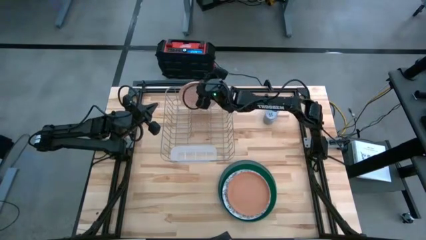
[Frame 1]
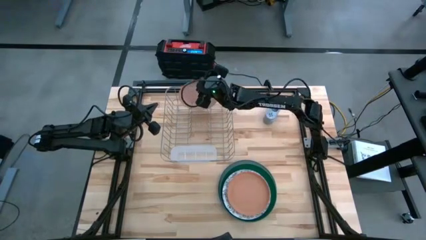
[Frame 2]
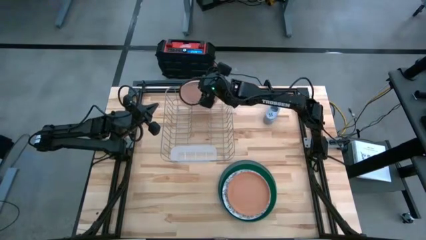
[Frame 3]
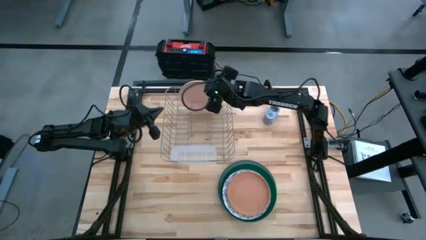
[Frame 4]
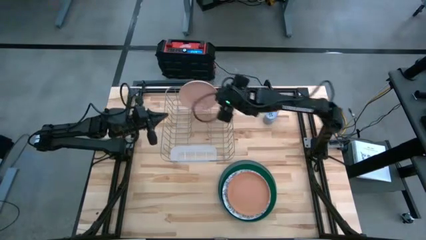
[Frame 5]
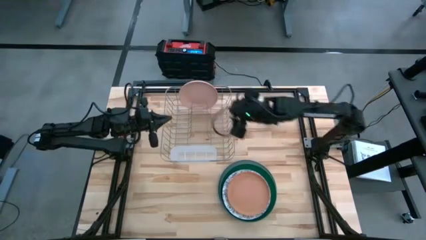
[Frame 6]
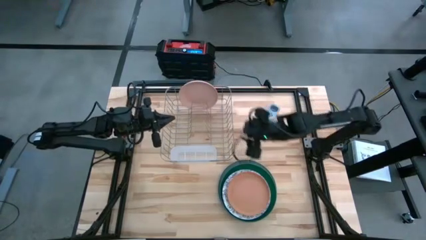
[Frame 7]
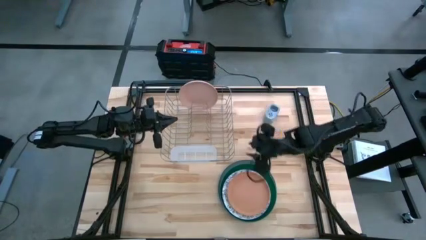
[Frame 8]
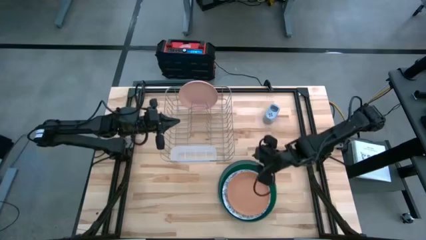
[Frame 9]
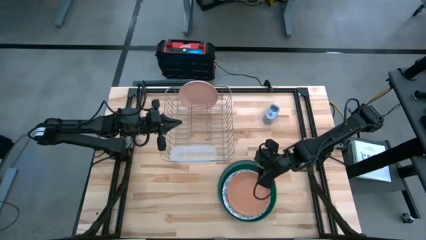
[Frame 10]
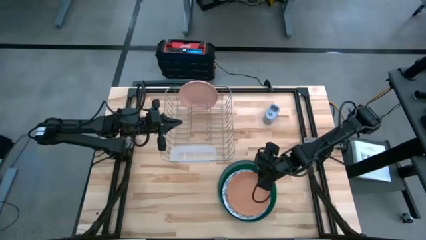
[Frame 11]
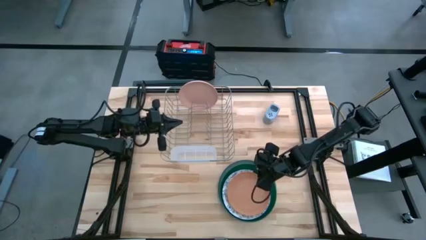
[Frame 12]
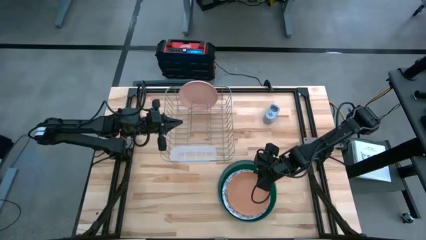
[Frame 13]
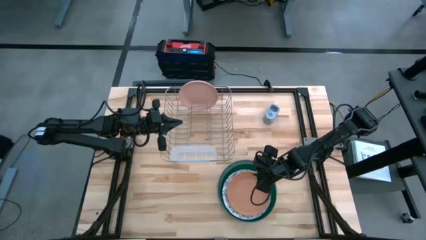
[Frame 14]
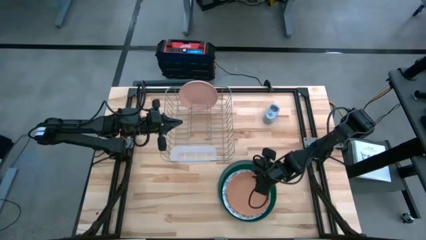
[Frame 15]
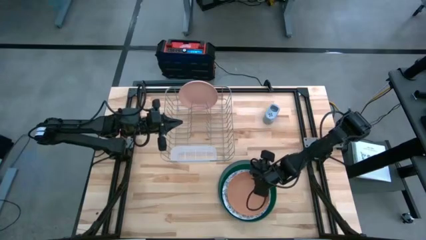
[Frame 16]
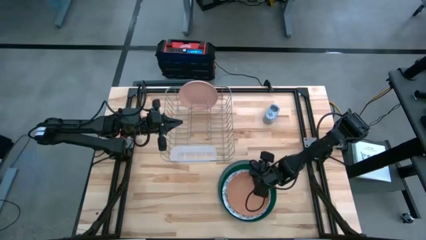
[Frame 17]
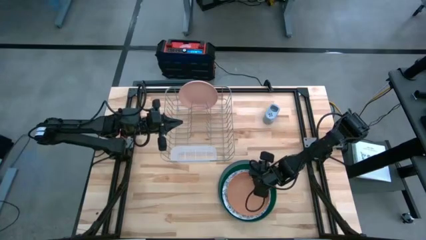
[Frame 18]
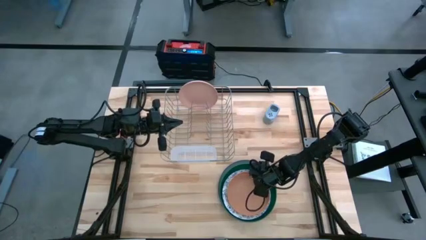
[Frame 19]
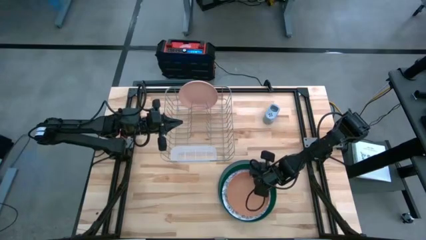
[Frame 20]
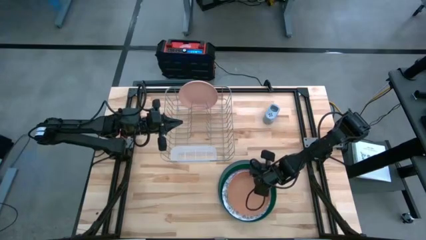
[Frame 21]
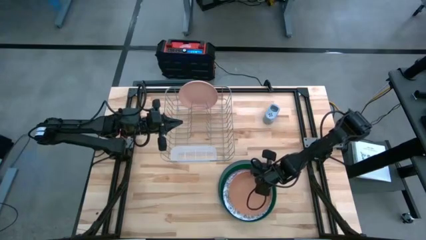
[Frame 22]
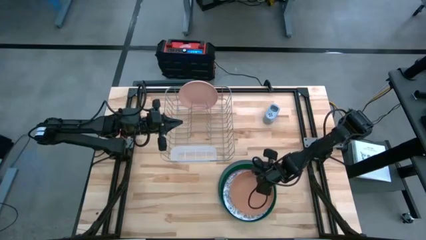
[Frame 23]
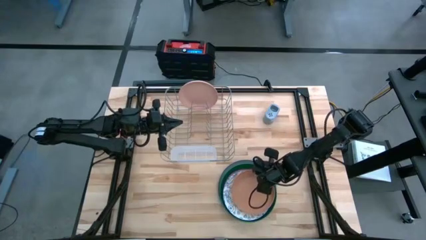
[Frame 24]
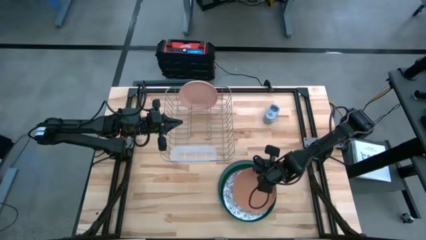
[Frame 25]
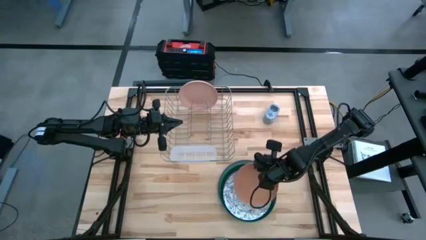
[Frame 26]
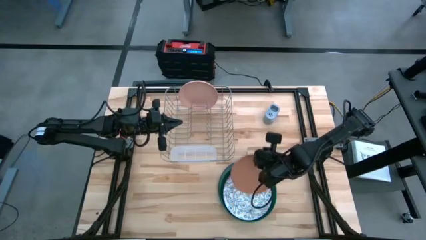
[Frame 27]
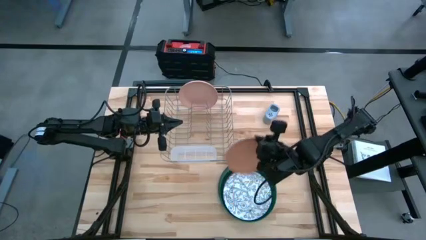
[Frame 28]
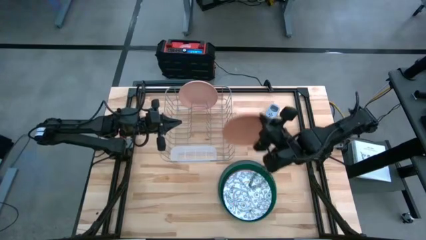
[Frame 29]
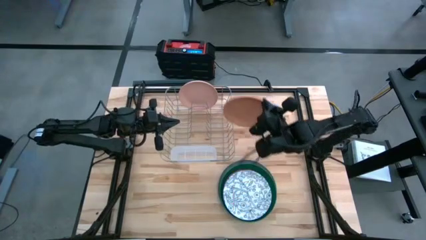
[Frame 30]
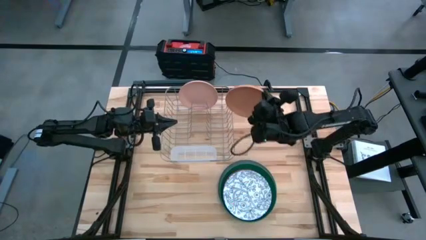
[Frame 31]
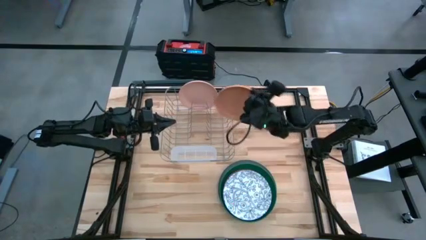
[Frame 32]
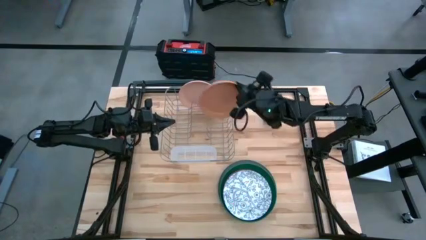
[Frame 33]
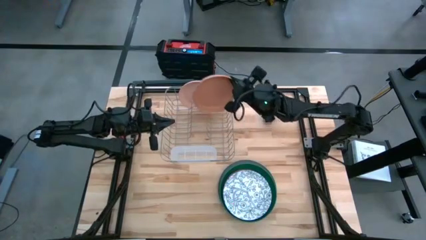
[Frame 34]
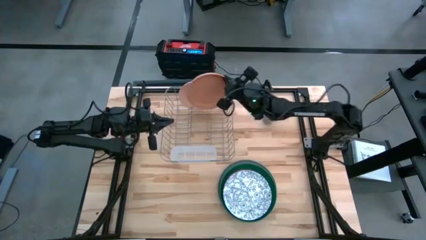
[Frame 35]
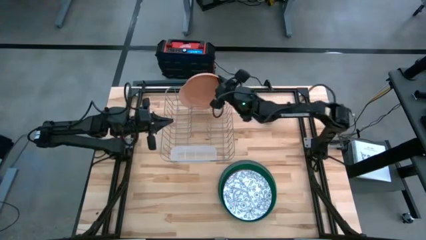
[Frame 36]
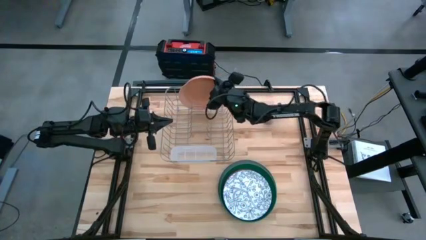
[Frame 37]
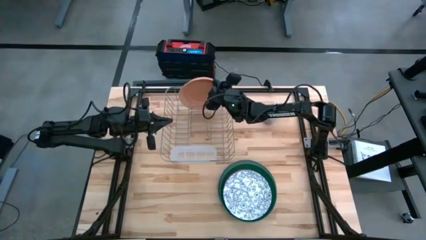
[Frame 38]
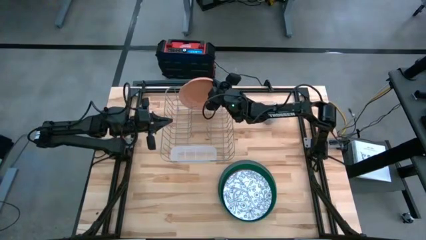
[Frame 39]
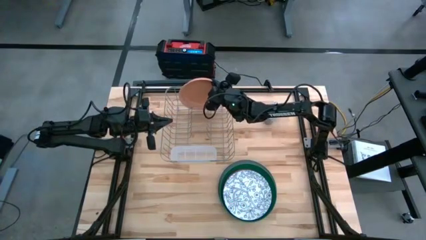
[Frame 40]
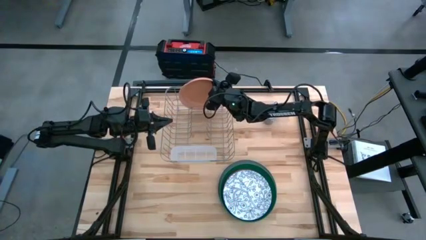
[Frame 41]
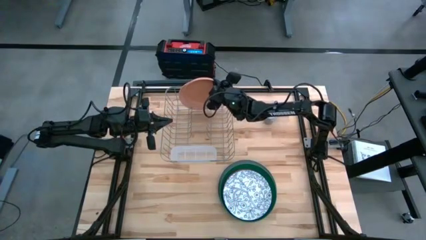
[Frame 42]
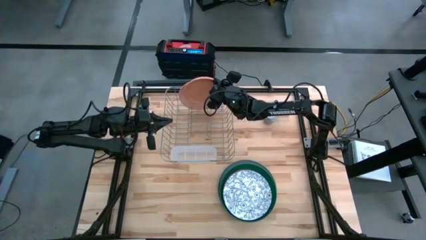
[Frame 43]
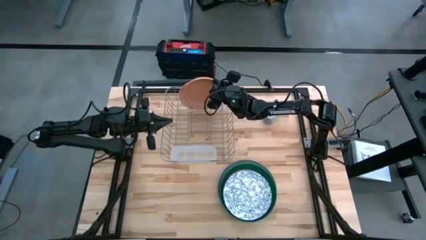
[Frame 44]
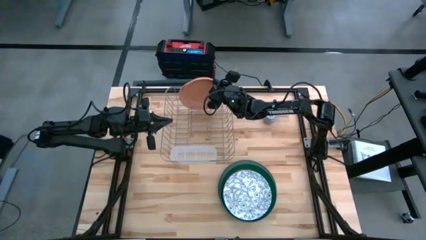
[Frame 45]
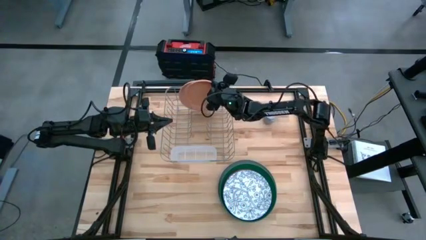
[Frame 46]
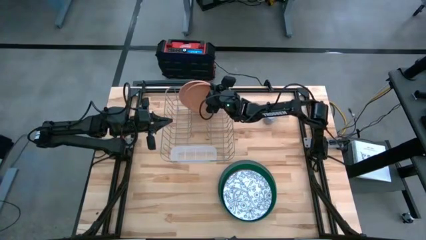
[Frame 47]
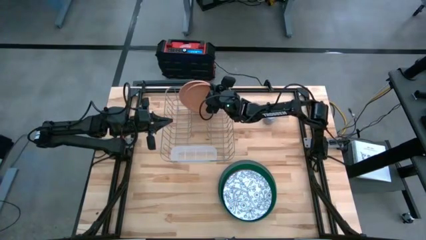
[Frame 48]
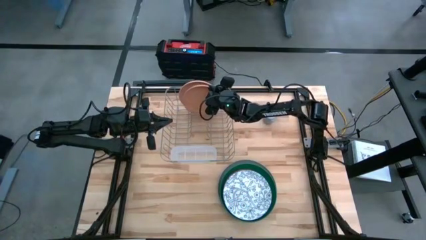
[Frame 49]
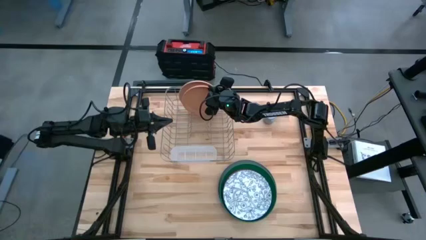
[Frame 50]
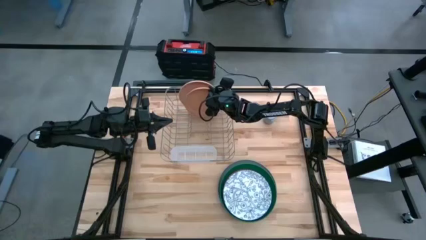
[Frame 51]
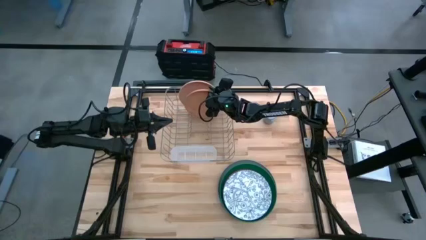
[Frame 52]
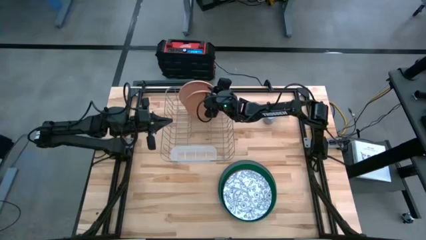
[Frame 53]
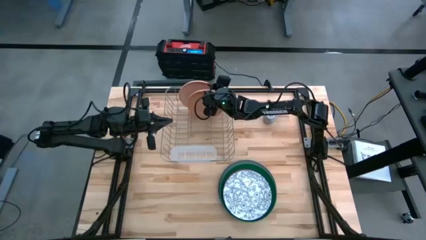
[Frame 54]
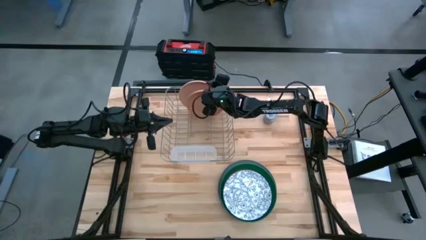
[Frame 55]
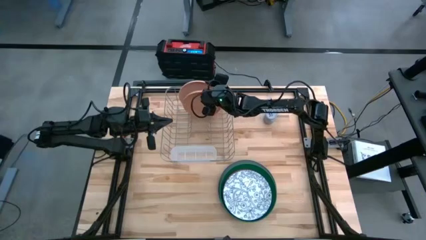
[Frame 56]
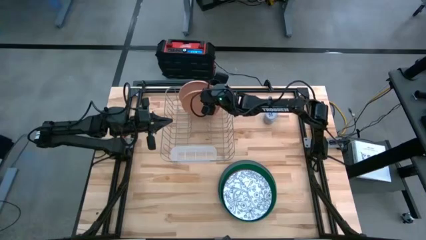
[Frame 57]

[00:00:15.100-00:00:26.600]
Task: Sort dishes
Put the light orange plate in the dish rack
